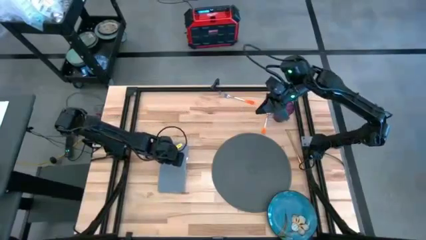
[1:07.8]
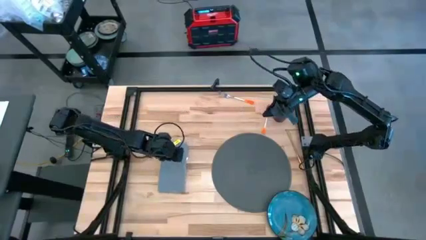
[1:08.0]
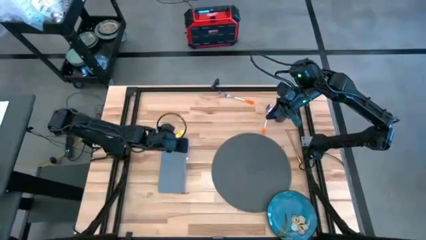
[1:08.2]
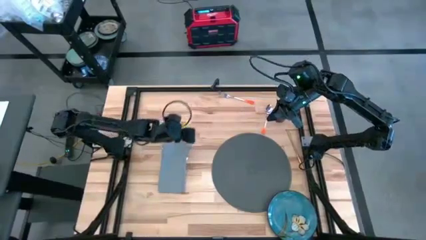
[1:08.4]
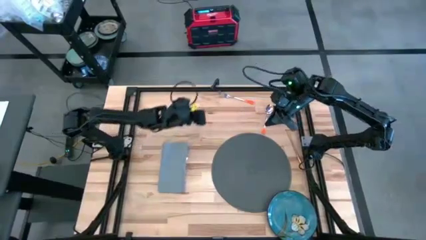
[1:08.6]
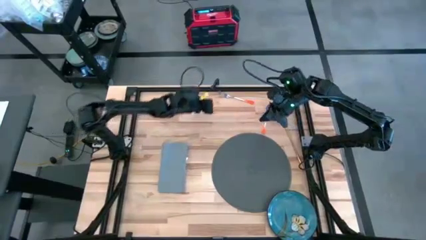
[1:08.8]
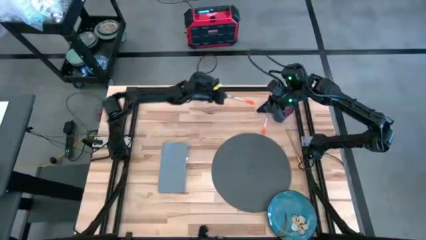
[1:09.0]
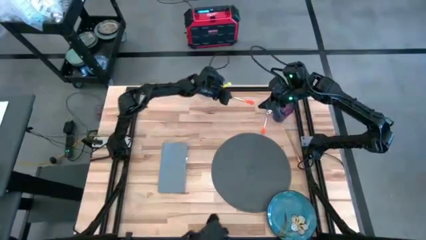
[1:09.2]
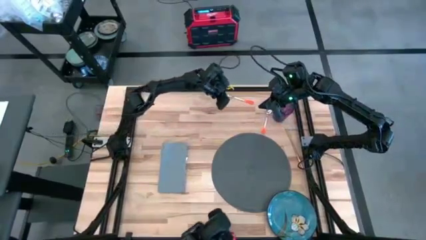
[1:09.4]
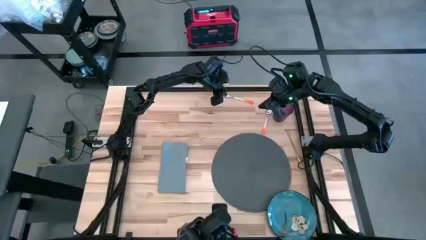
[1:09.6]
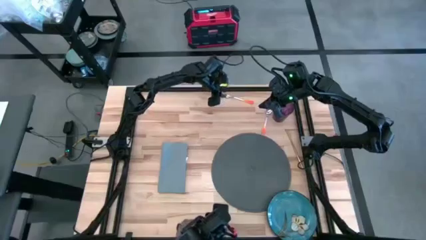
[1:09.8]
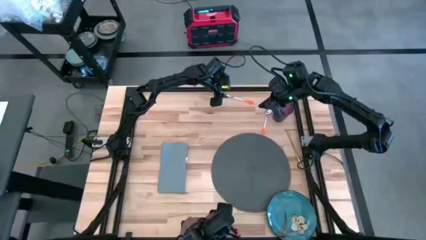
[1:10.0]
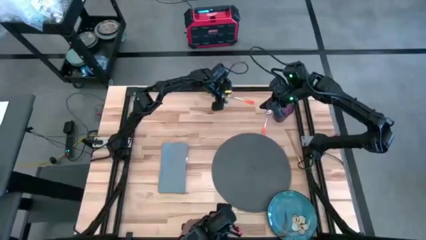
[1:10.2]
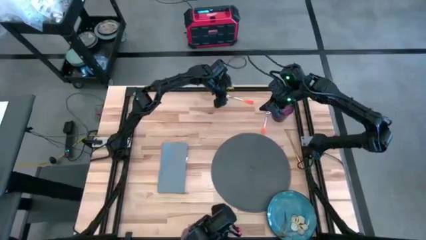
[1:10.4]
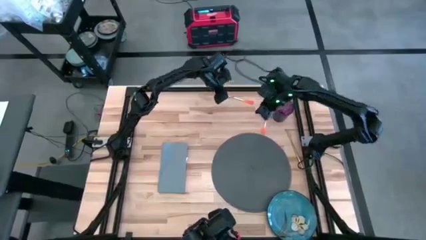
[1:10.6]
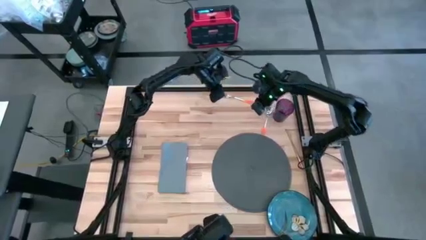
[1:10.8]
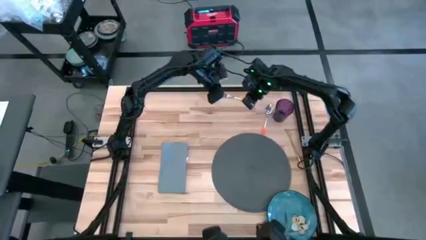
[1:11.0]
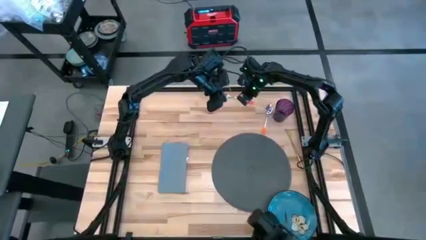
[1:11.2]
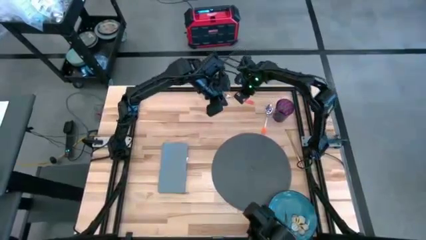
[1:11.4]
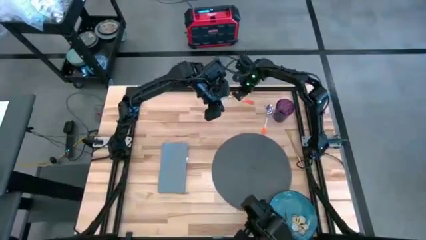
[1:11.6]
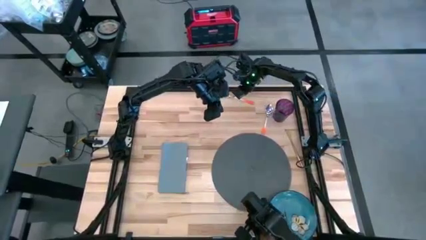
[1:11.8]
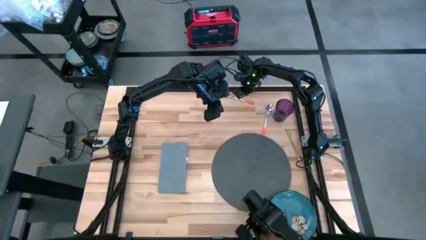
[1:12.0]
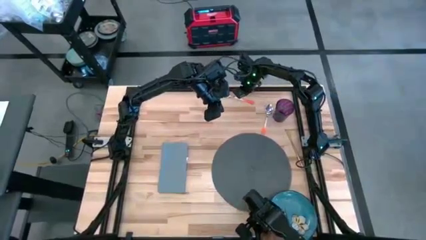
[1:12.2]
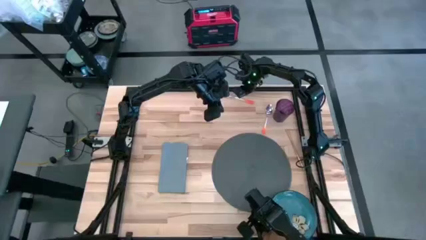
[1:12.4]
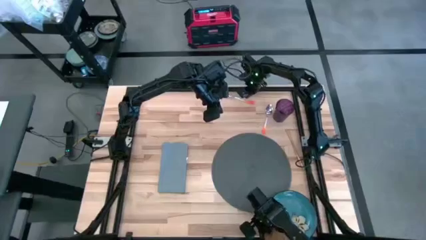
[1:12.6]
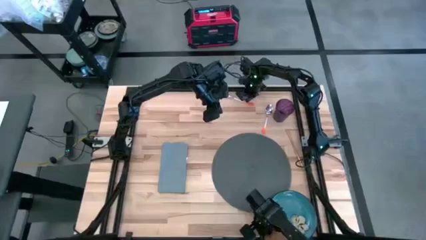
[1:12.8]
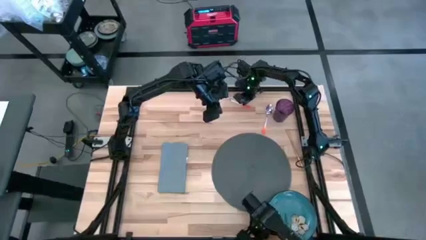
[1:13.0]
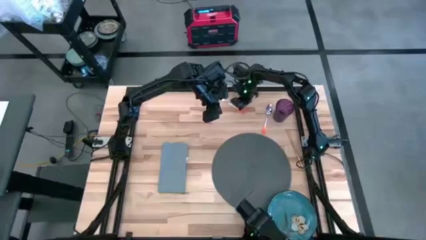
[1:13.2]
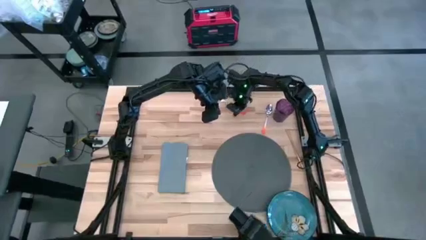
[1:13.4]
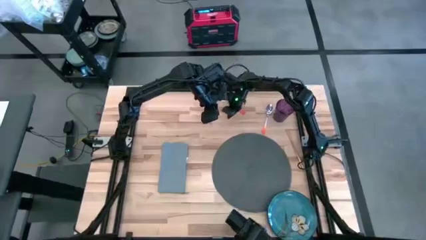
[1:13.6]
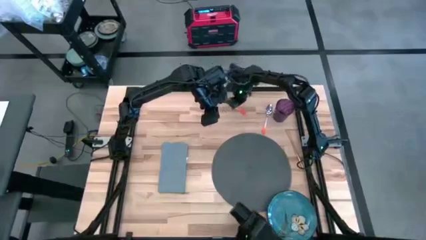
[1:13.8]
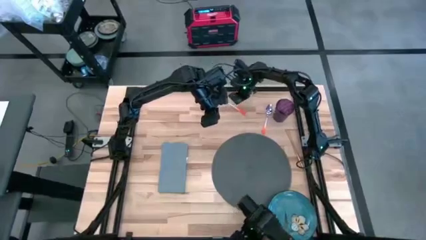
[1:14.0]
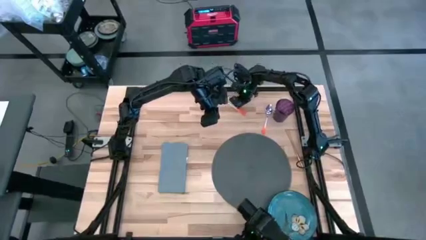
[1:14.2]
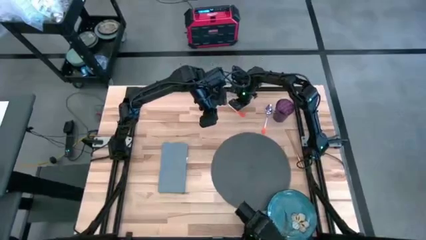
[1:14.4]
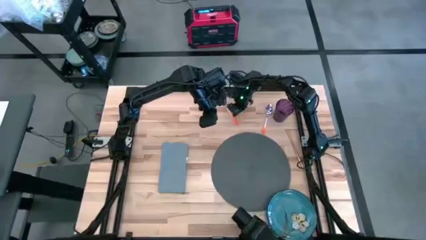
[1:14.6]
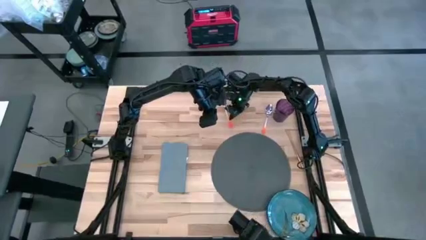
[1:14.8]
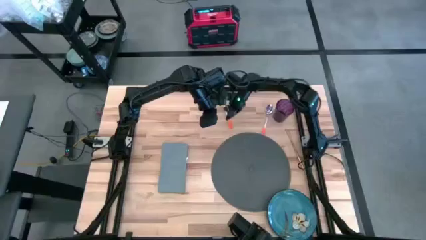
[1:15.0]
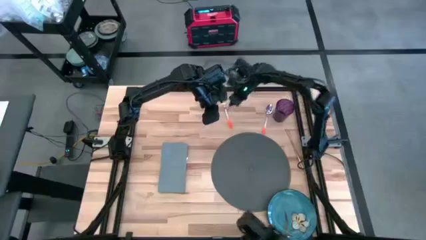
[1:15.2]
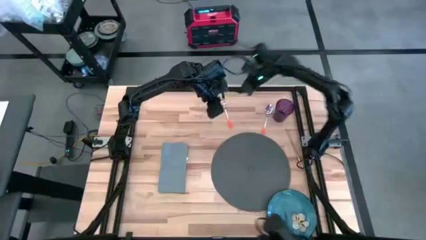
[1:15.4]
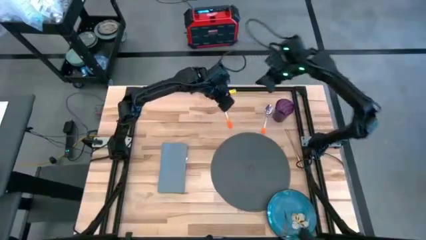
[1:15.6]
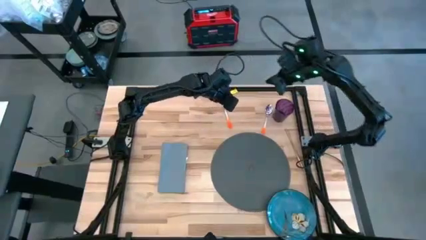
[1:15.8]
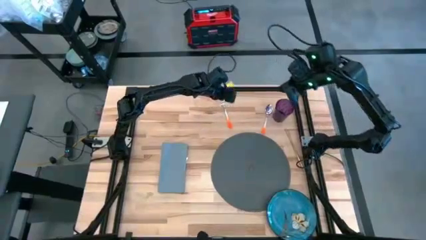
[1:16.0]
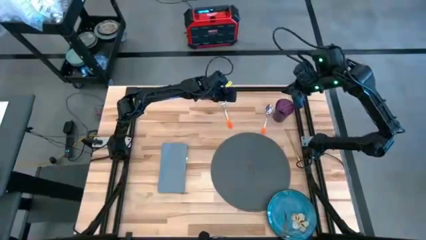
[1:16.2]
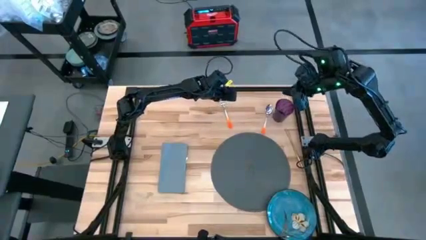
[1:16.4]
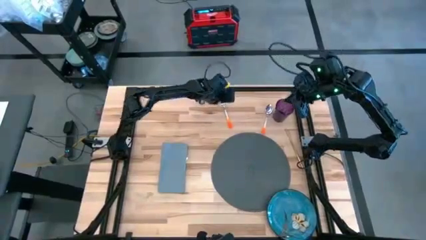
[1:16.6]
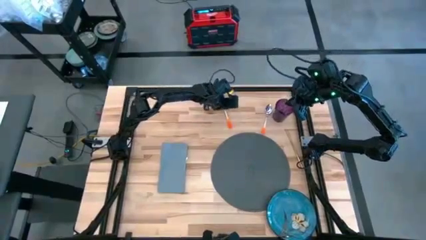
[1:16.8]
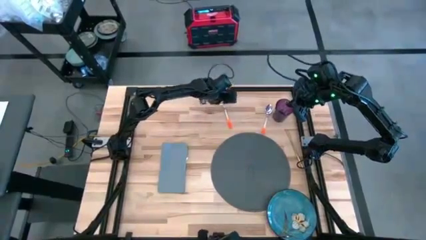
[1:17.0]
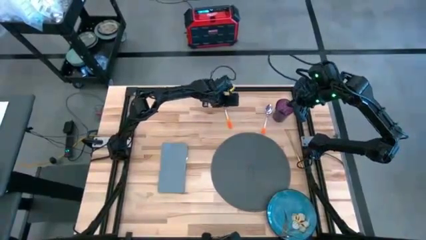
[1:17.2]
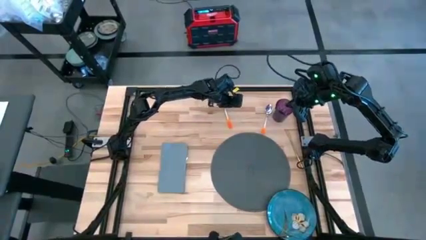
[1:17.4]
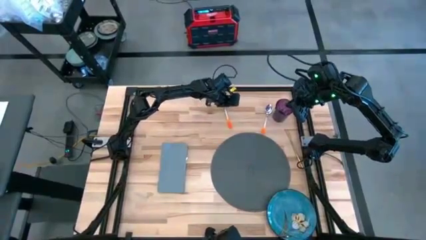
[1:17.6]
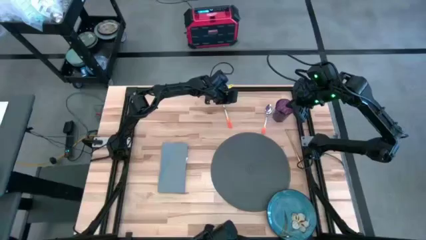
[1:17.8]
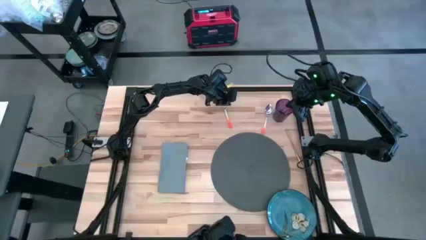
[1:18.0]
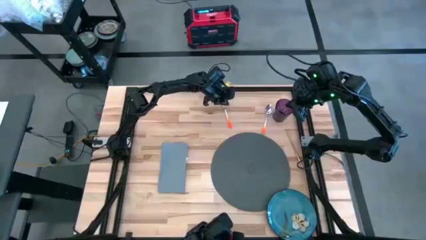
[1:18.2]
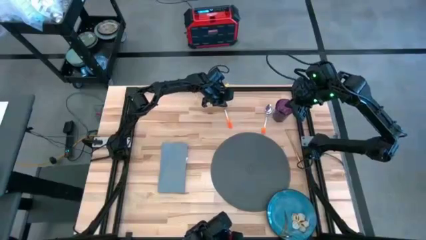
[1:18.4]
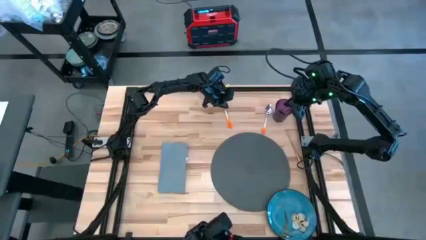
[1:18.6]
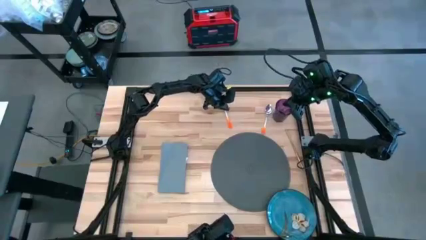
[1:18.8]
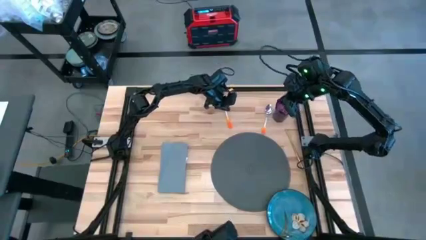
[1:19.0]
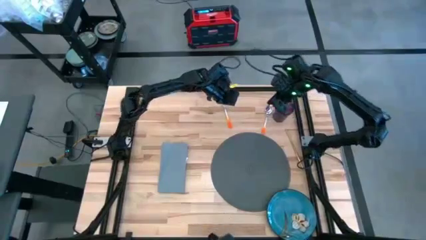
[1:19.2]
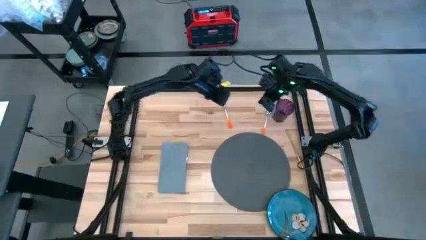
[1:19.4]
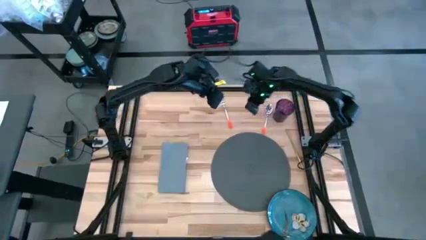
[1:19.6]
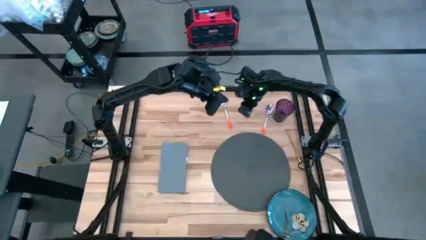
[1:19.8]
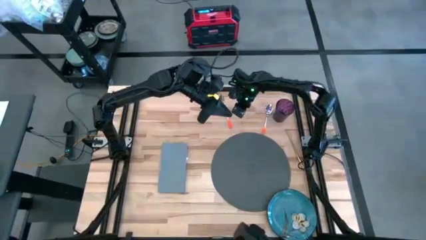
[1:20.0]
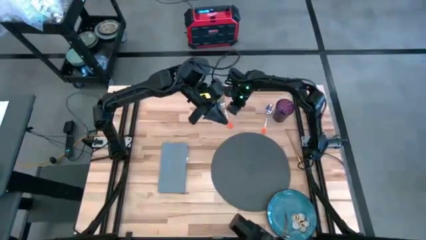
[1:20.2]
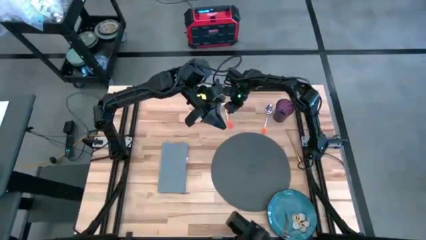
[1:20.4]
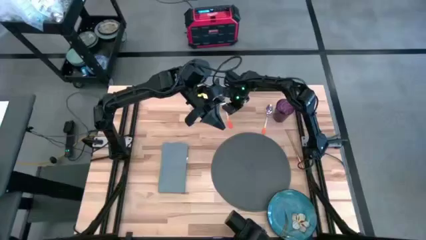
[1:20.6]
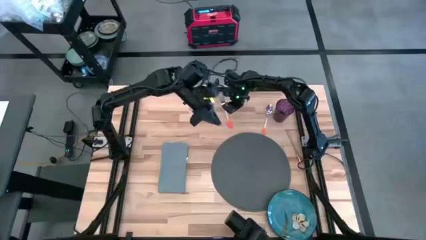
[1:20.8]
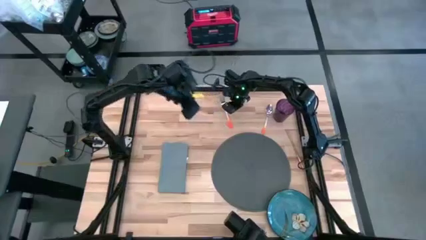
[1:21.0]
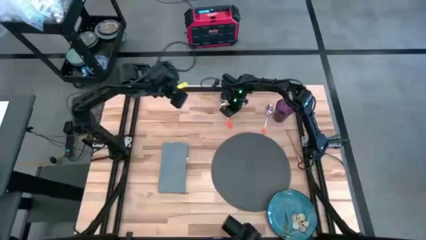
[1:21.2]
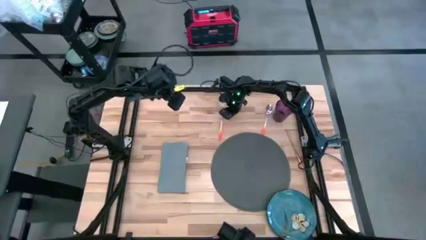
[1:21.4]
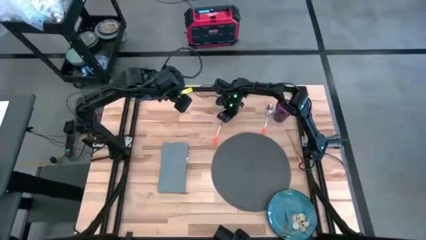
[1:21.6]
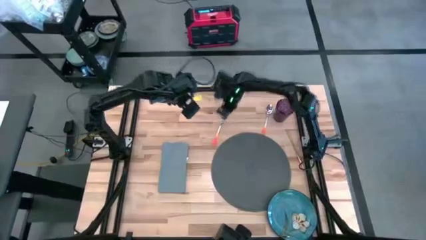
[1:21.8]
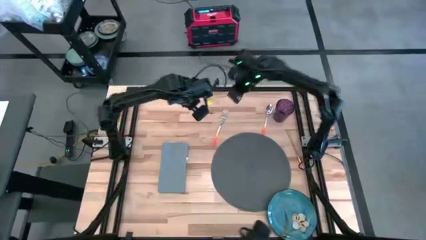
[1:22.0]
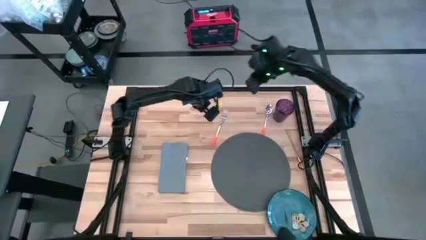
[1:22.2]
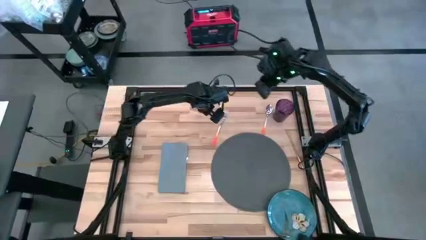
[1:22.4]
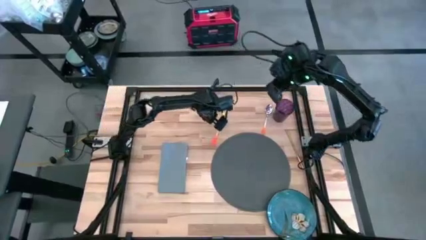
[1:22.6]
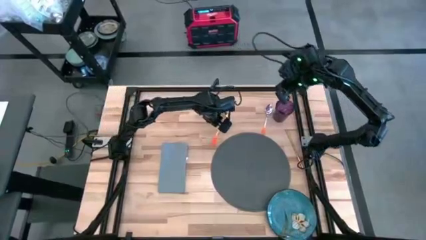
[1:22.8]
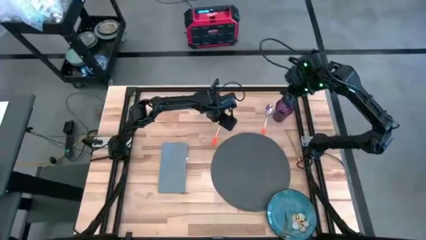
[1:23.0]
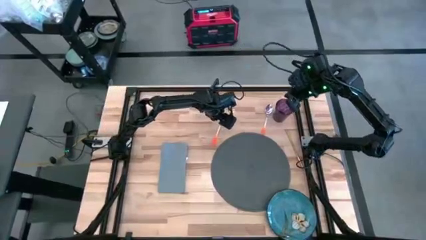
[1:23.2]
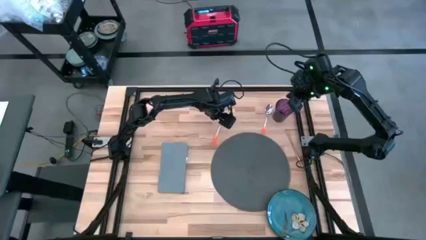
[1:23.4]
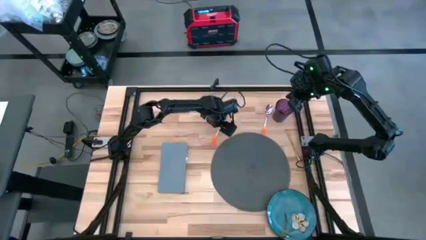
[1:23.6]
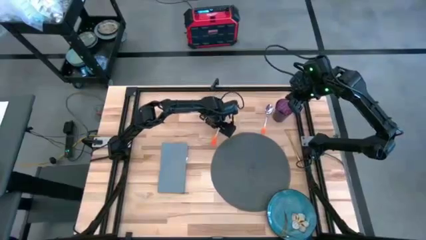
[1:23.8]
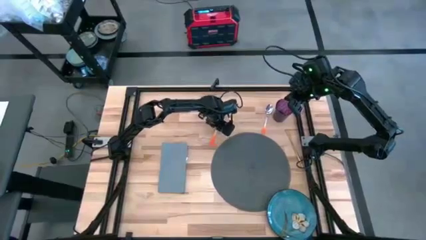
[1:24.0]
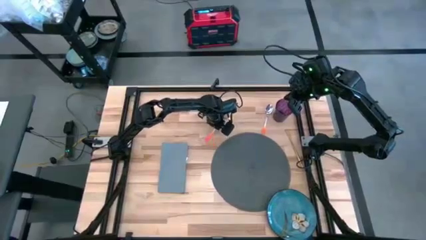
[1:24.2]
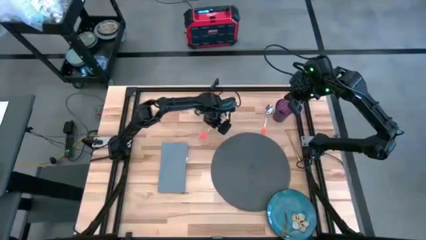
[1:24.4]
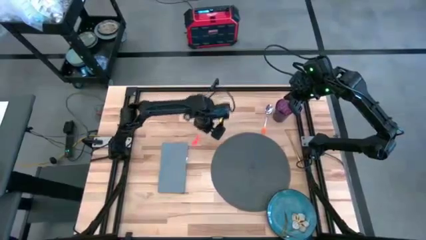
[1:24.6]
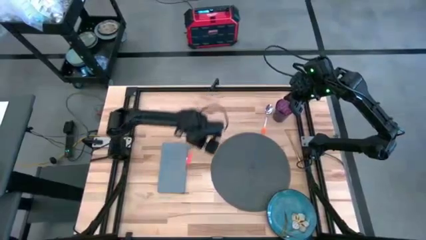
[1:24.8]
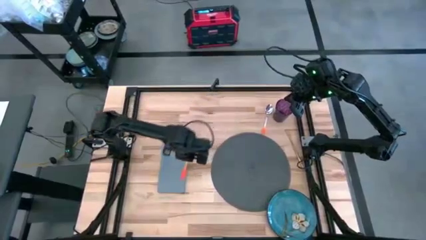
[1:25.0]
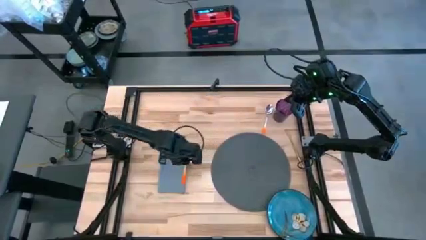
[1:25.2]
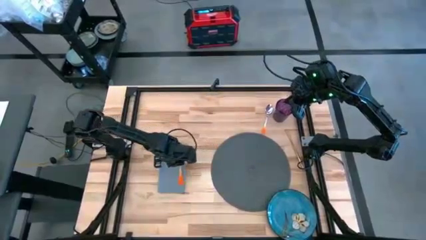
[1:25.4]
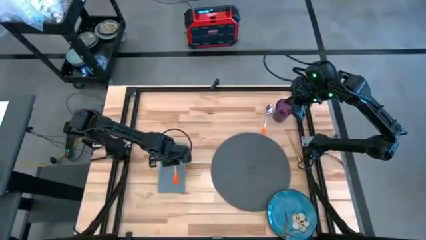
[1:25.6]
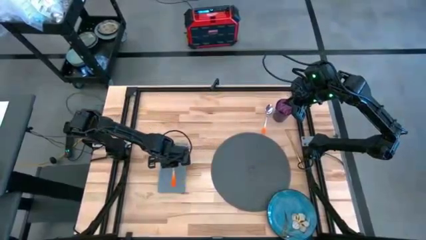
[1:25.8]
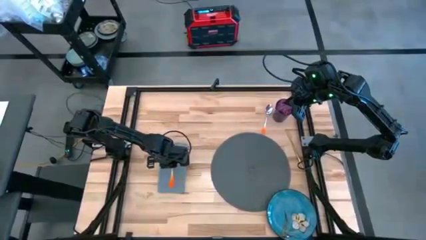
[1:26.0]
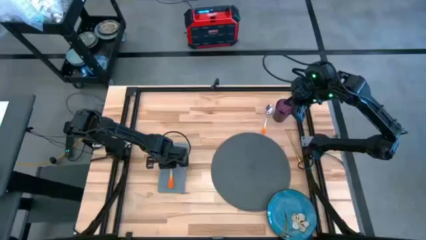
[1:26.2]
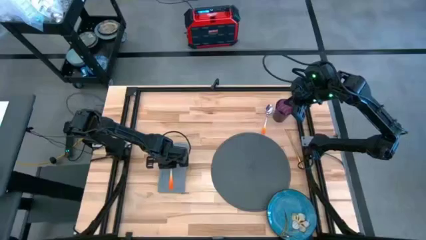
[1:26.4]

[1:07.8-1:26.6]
Task: Set table place
Put the orange fork on the the gray table napkin
